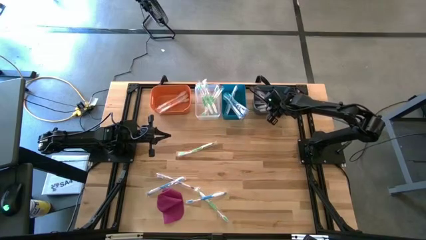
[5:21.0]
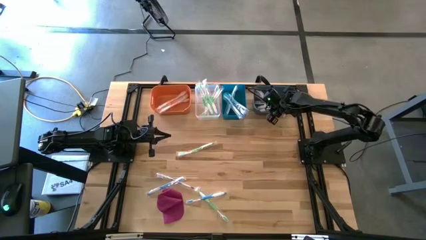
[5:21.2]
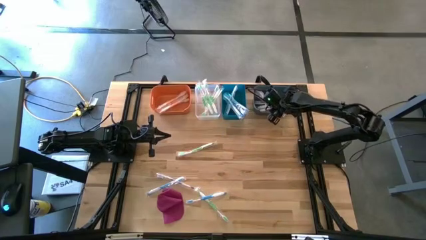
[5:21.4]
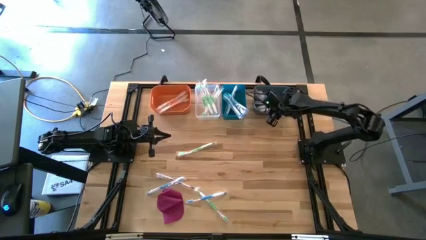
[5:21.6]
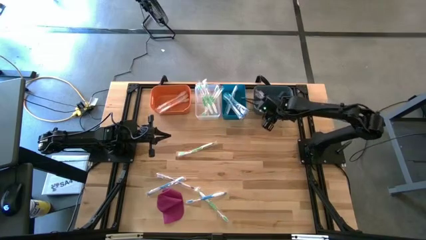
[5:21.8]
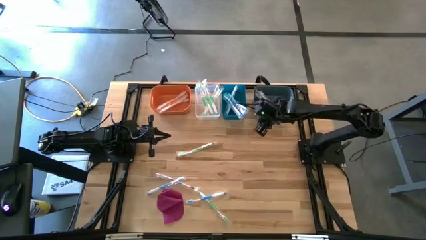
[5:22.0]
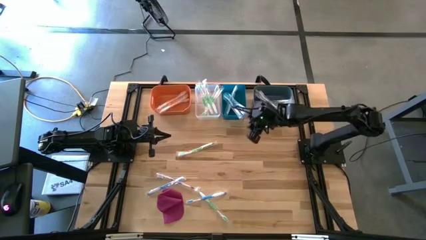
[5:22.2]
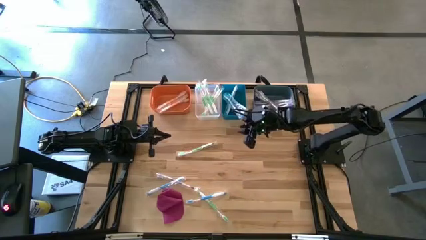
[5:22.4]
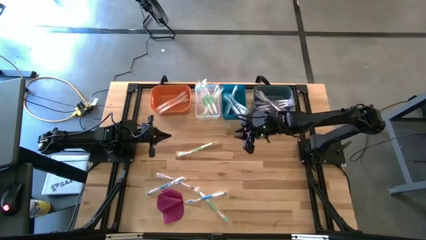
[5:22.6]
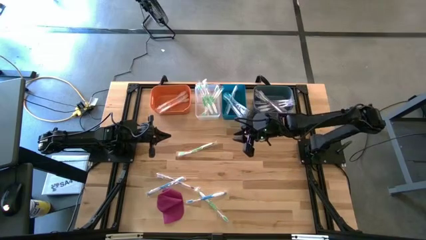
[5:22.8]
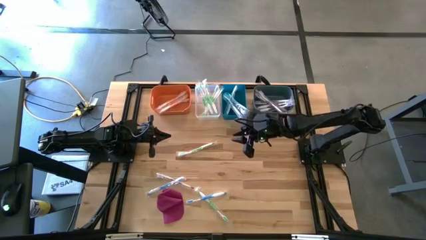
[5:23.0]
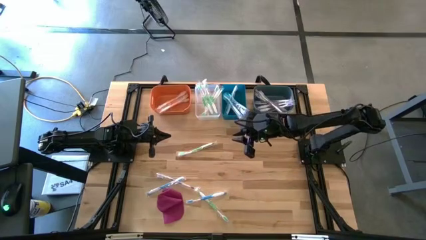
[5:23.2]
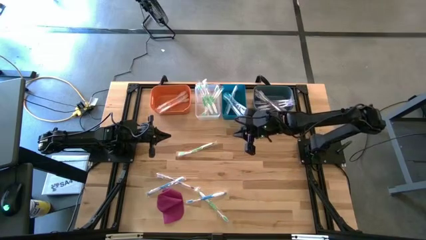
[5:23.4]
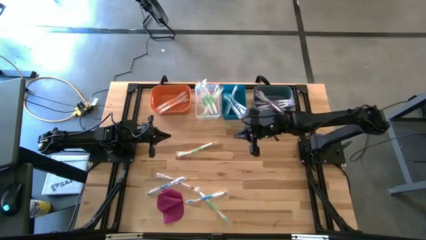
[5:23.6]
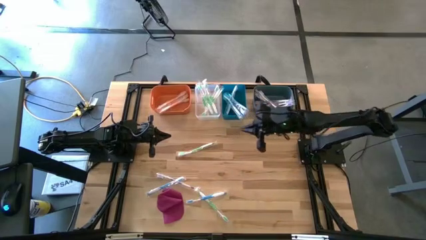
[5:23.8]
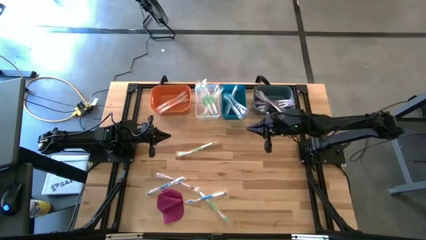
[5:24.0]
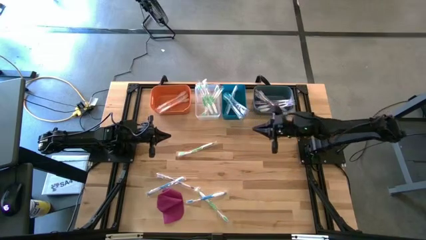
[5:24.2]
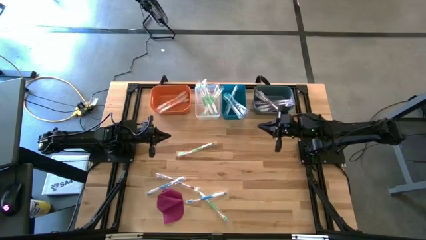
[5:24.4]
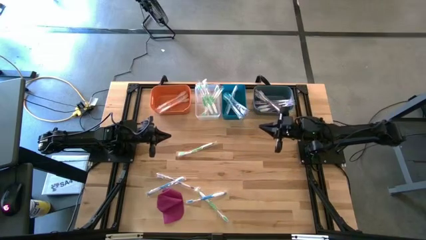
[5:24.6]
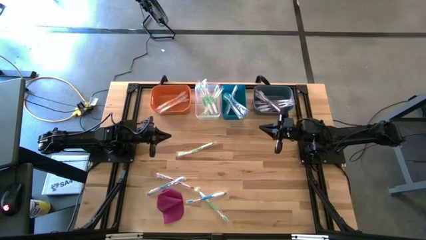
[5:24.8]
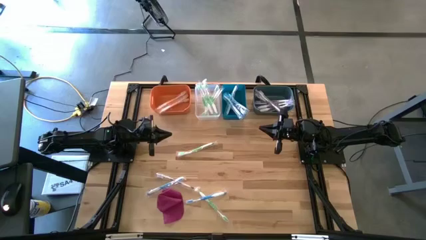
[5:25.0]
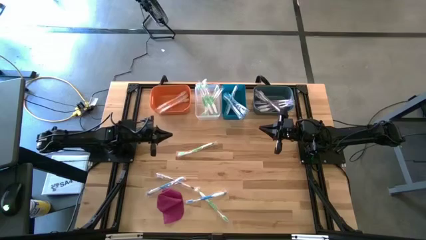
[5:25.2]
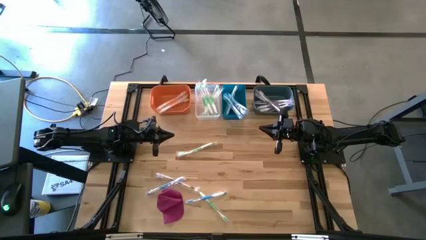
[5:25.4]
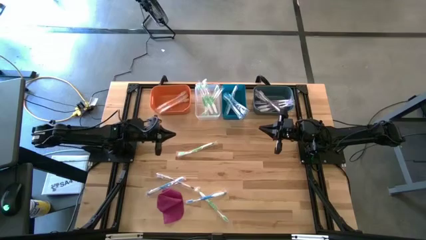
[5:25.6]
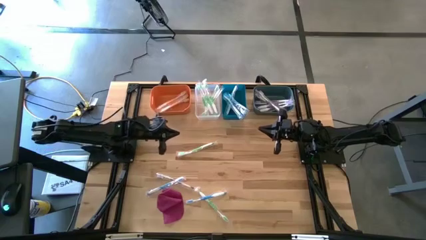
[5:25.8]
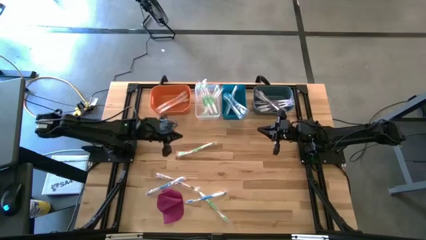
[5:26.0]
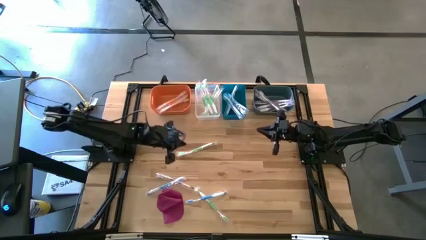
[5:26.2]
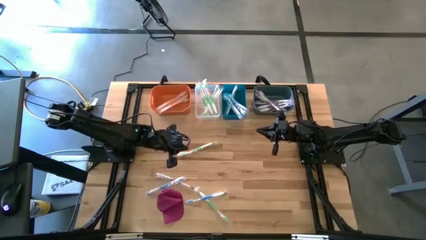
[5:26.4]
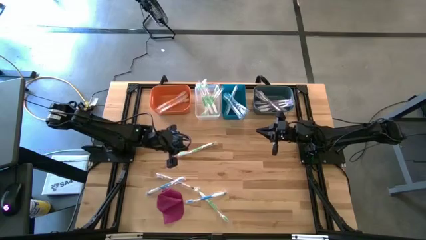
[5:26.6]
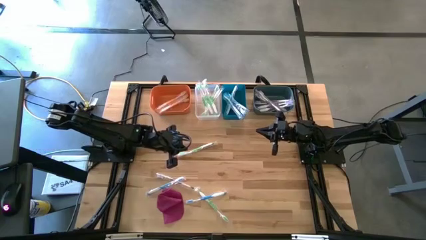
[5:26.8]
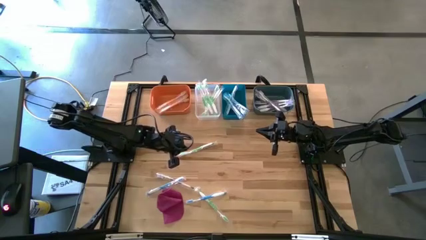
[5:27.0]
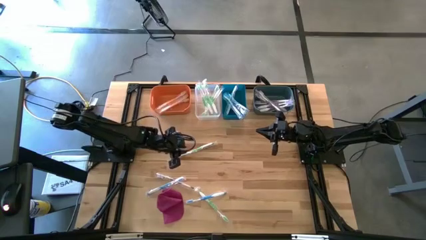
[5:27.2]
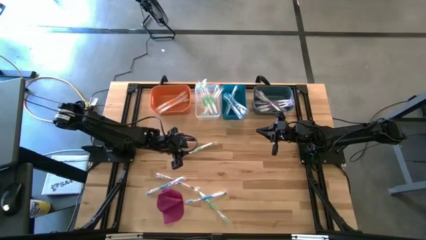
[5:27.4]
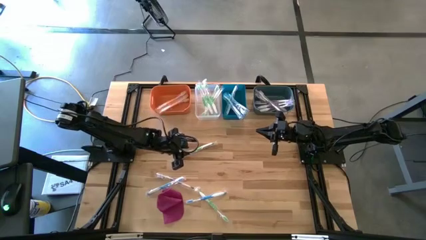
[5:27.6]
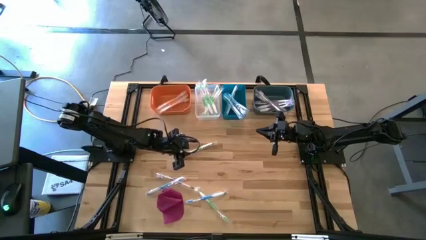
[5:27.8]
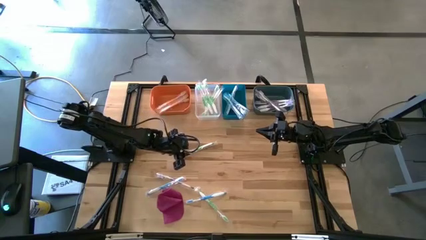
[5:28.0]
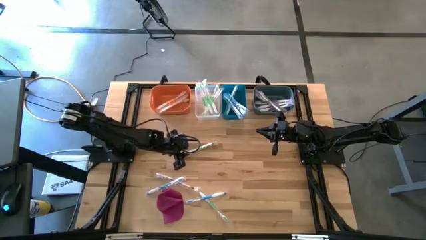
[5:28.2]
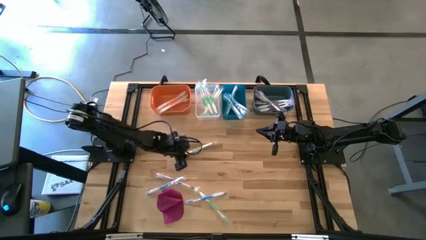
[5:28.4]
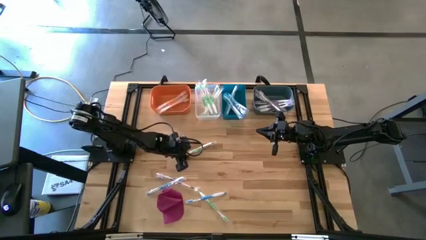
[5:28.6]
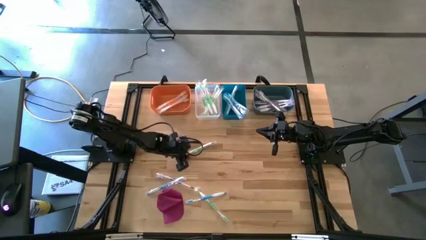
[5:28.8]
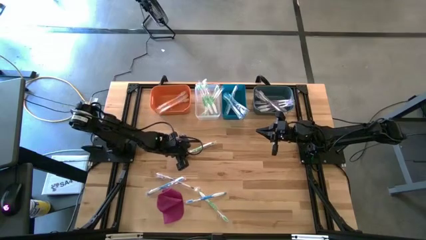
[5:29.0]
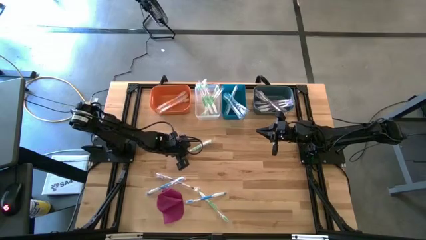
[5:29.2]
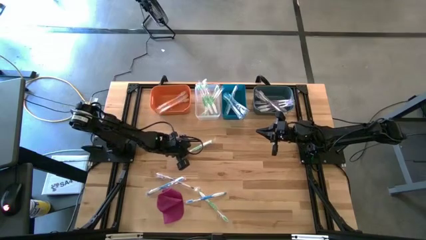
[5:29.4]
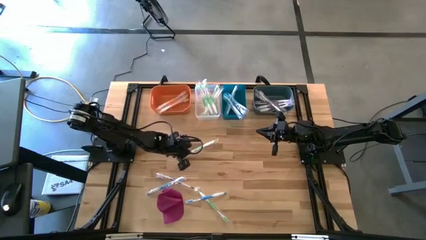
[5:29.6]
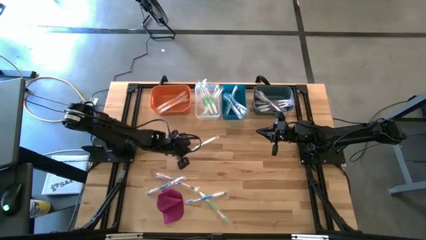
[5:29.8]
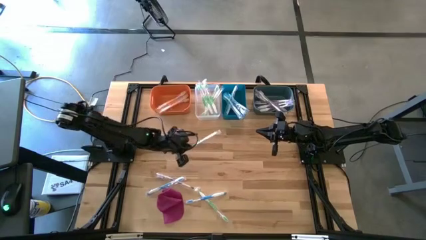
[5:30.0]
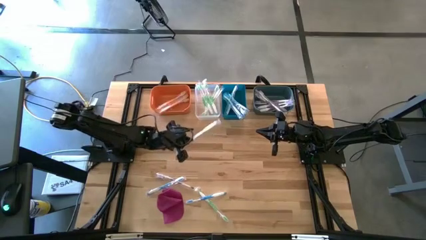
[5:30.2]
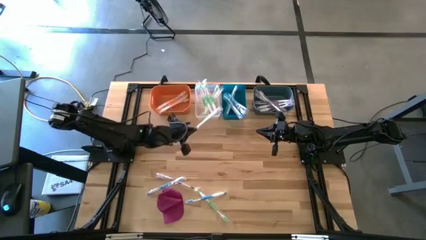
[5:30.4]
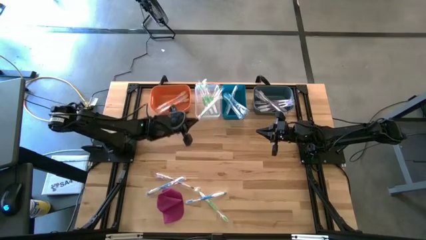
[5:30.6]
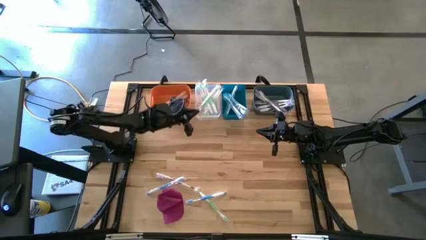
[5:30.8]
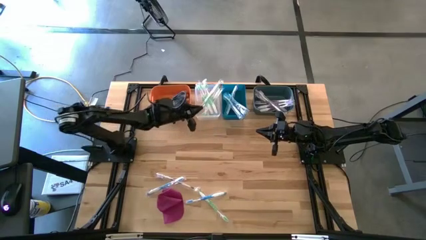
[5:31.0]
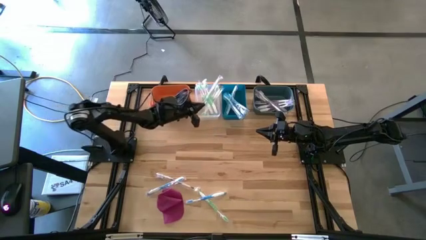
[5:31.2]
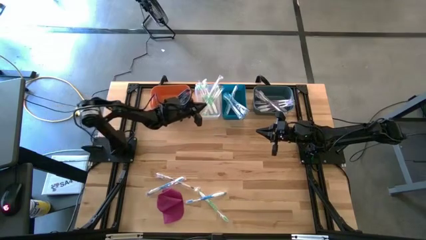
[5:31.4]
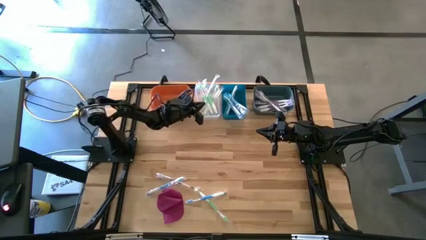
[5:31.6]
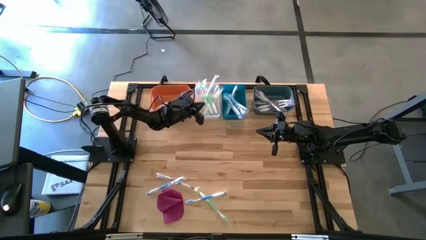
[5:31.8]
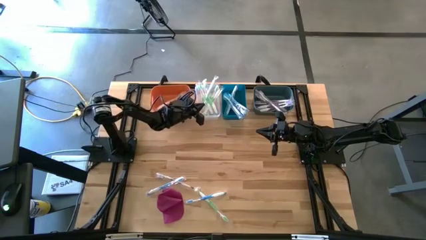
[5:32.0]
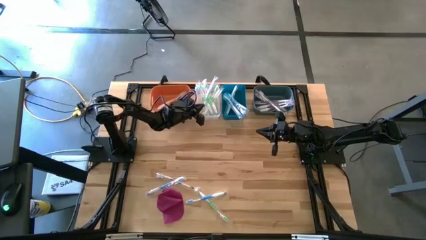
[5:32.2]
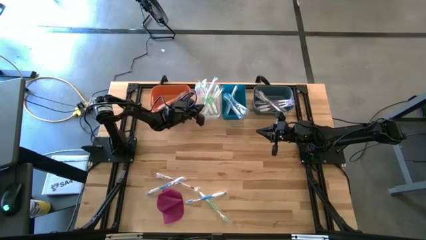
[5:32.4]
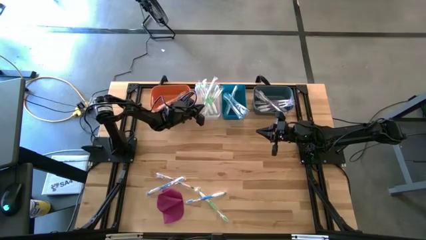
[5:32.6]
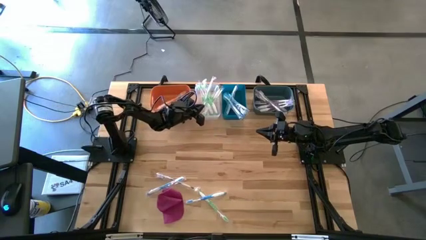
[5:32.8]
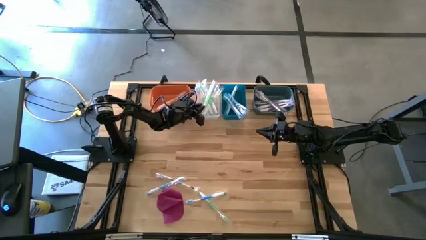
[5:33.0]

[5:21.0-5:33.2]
Task: Pick & Place Toothbrushes
Put the green toothbrush into the transparent bin
